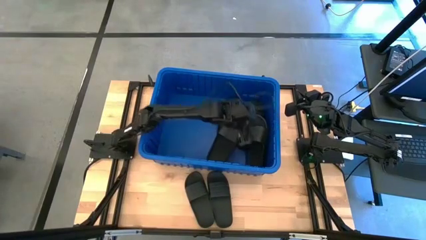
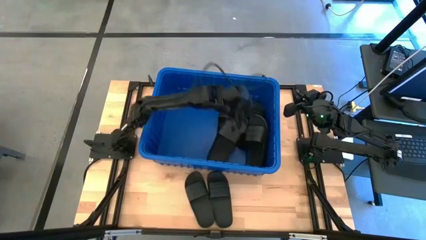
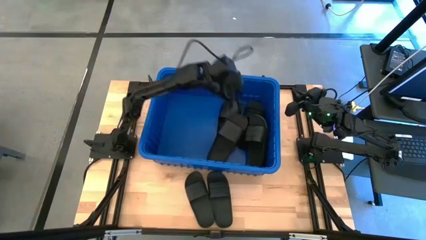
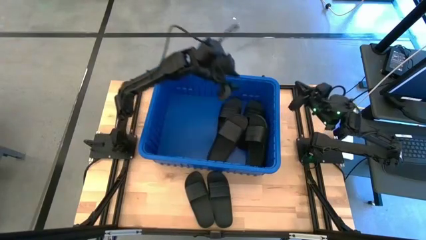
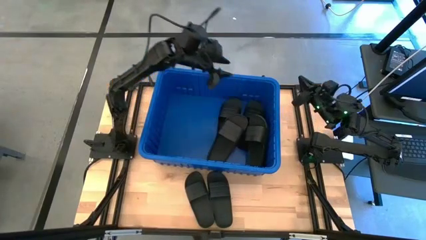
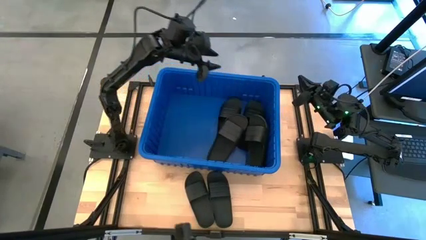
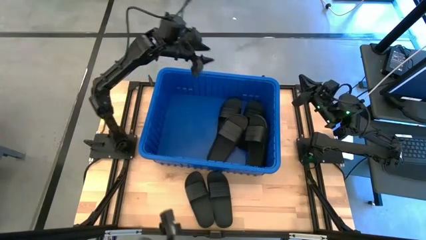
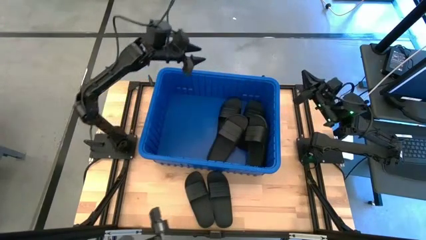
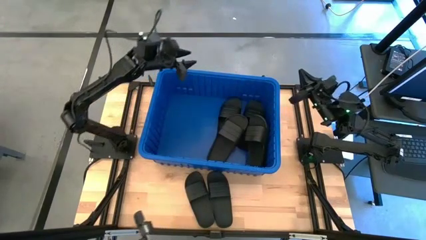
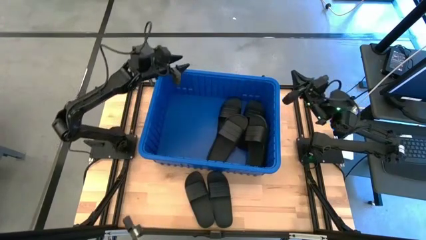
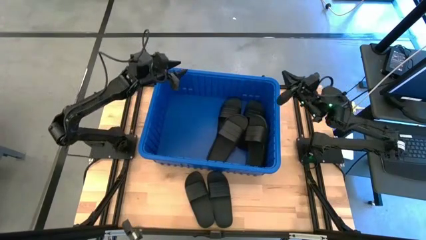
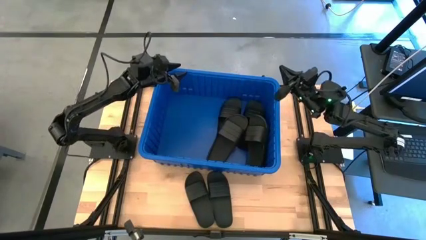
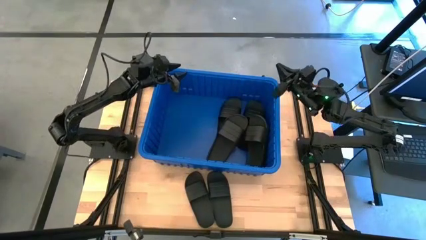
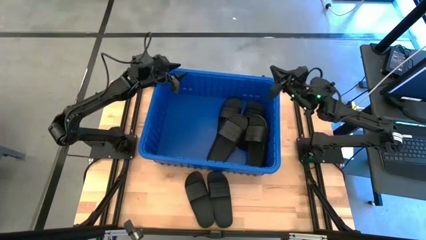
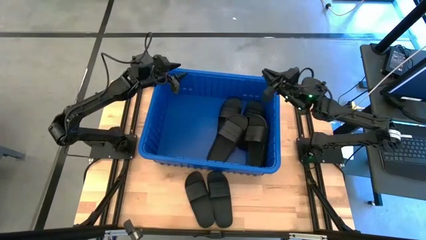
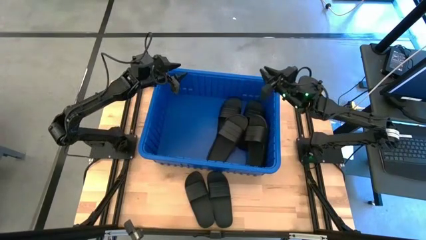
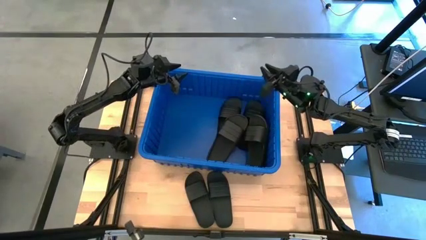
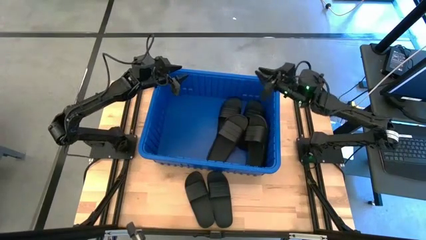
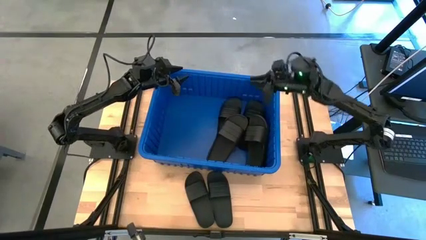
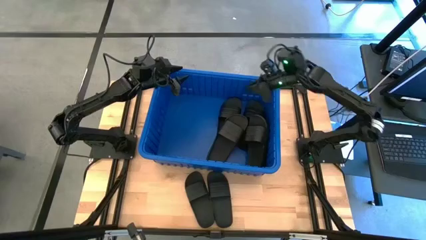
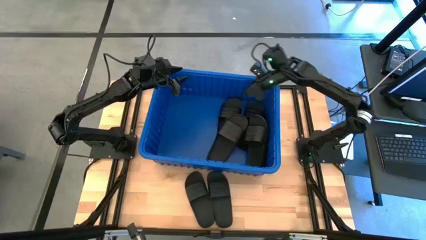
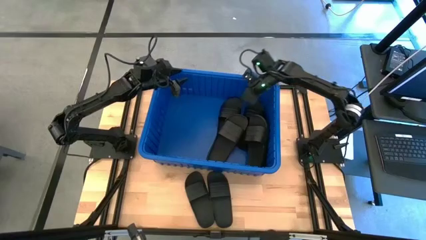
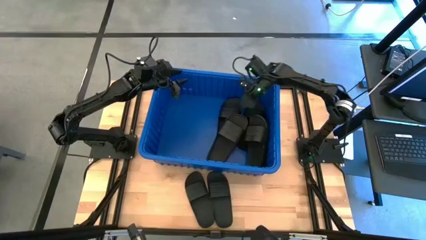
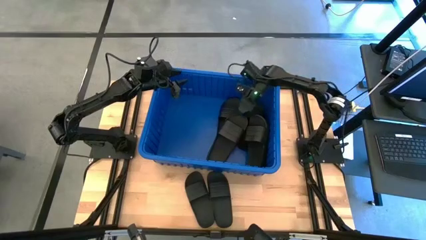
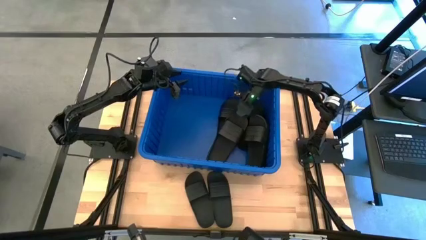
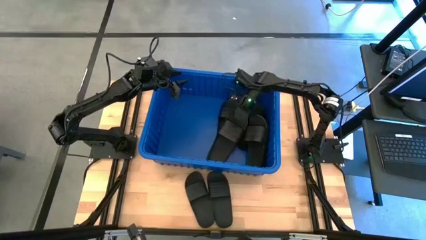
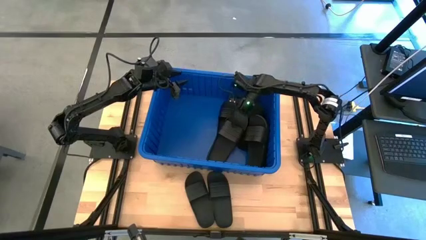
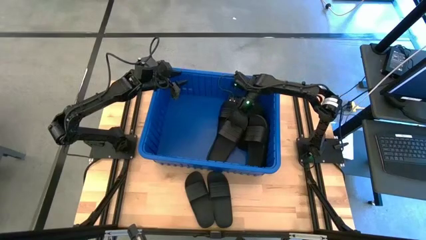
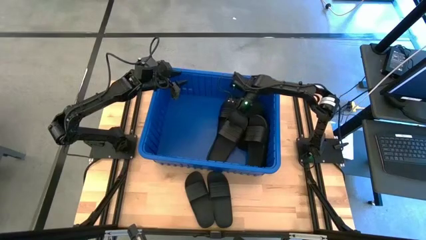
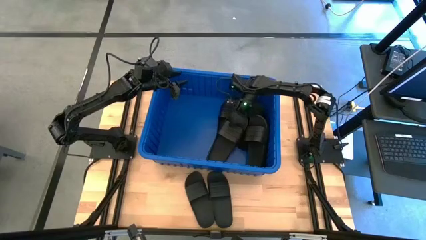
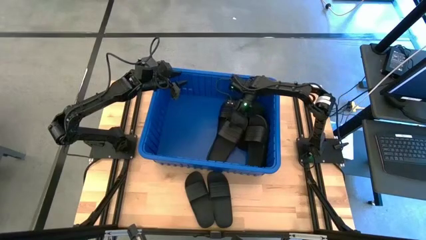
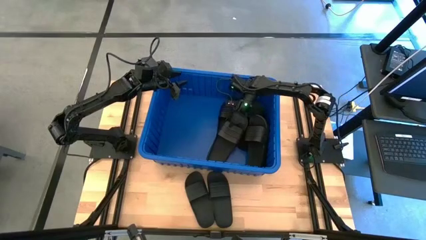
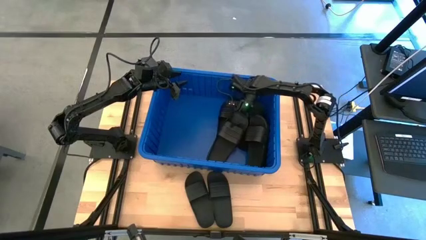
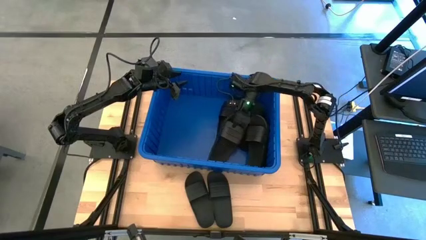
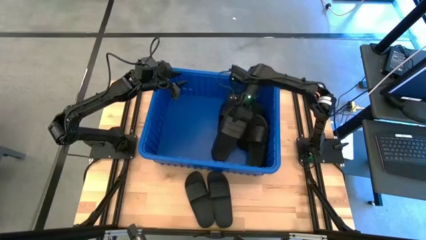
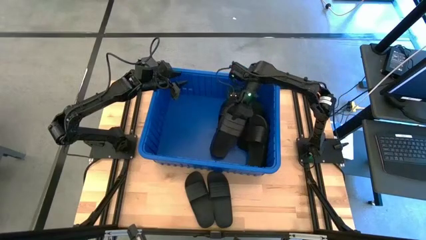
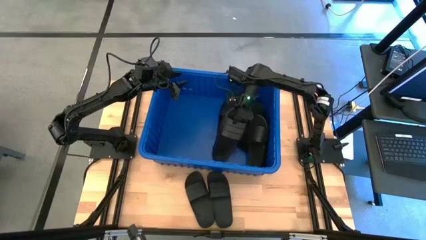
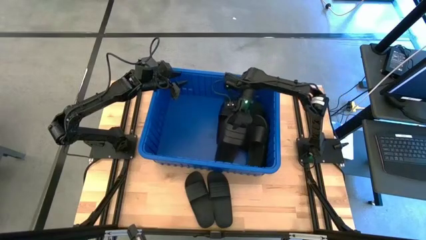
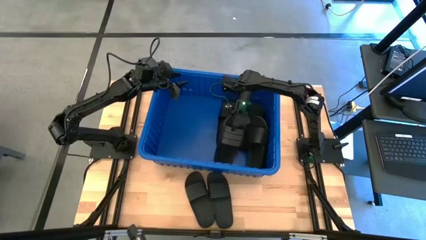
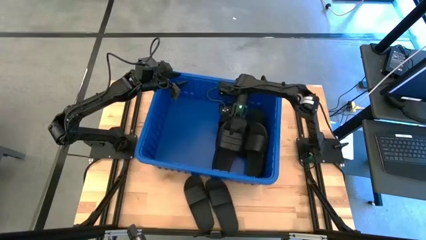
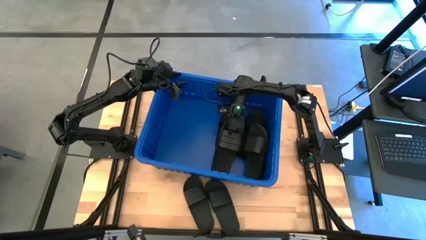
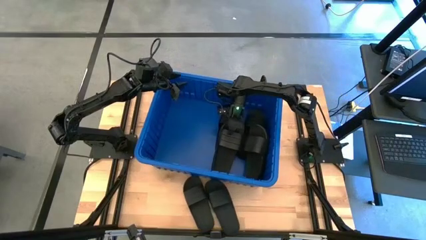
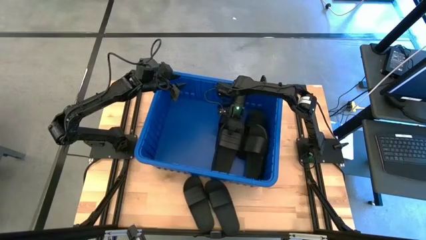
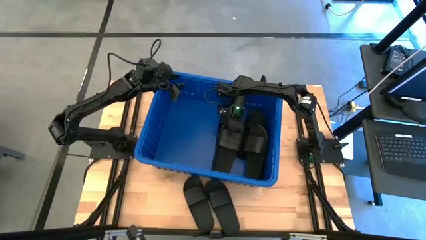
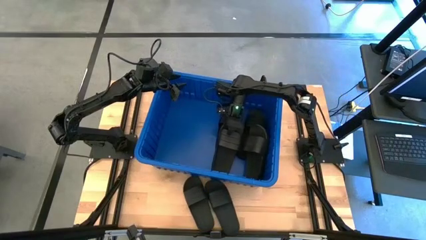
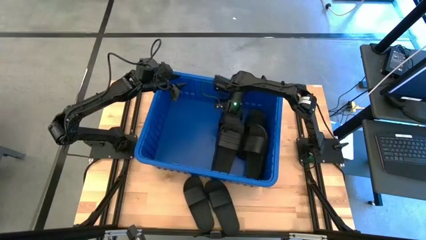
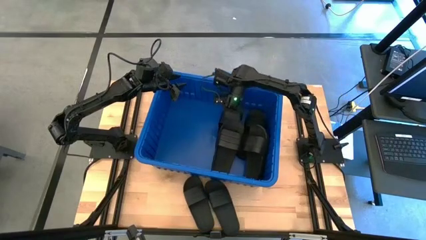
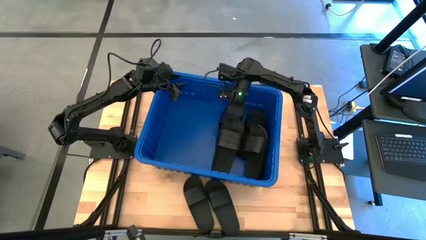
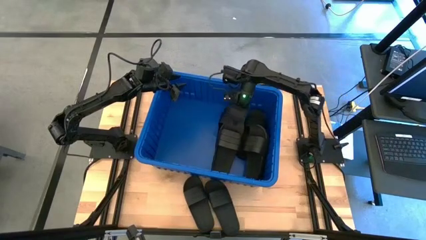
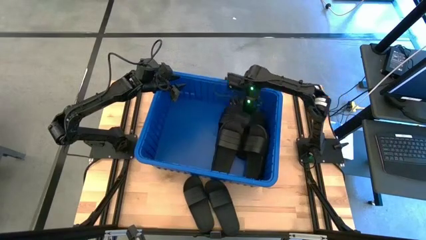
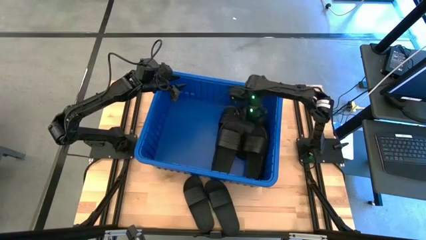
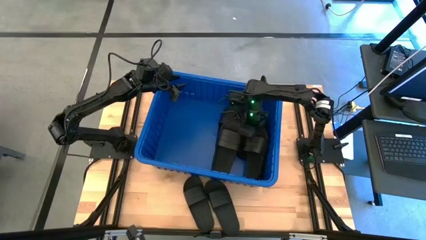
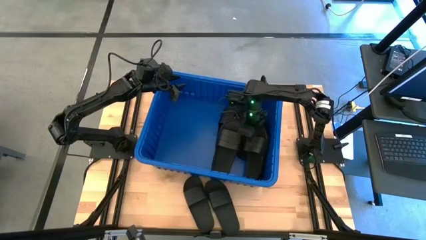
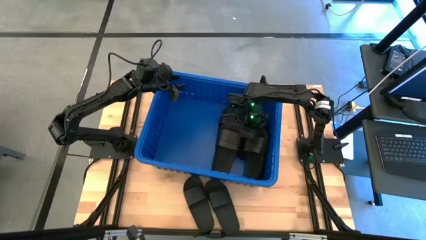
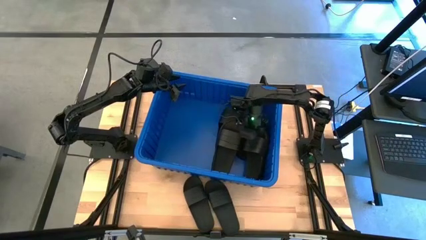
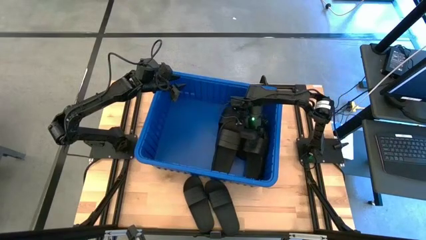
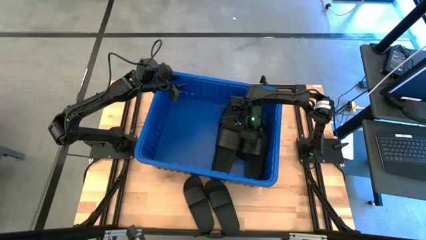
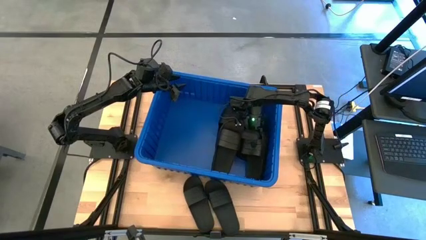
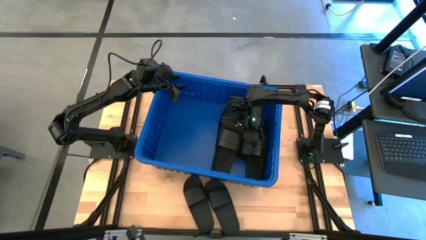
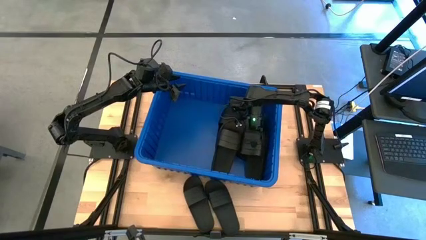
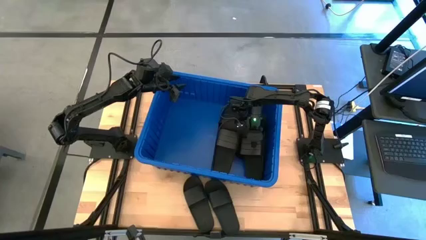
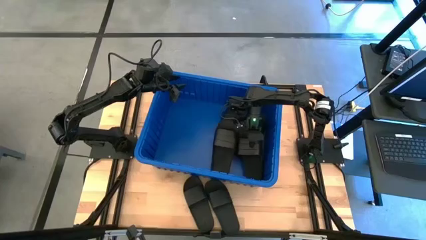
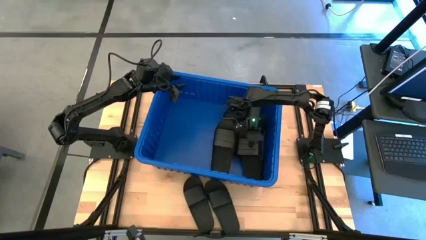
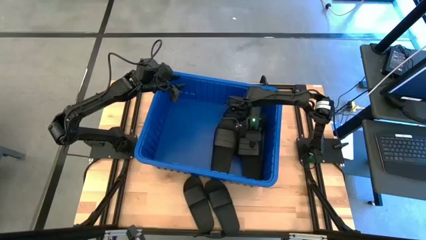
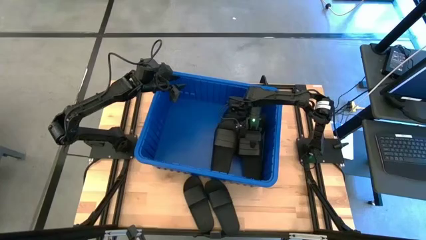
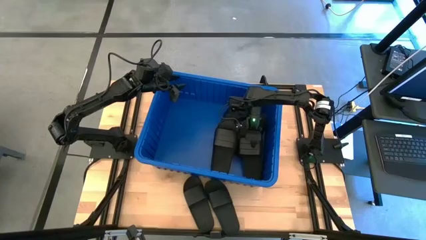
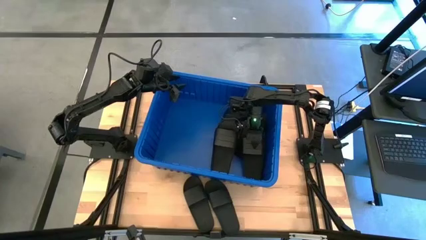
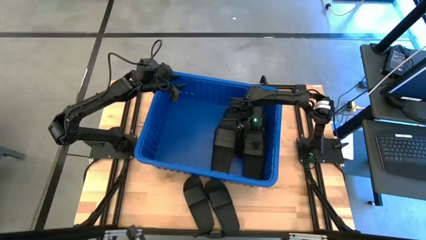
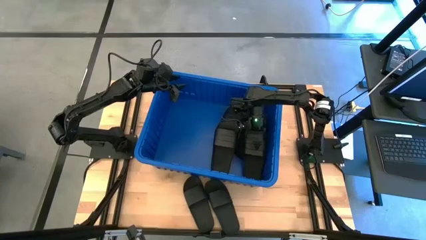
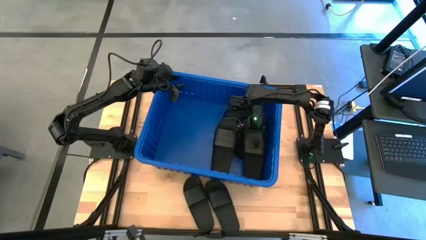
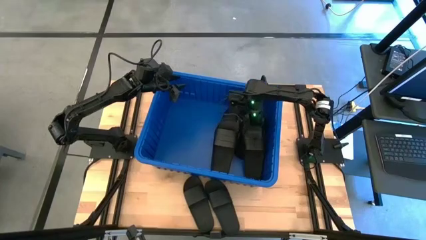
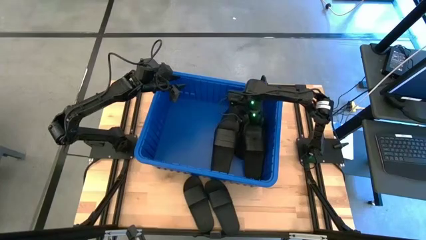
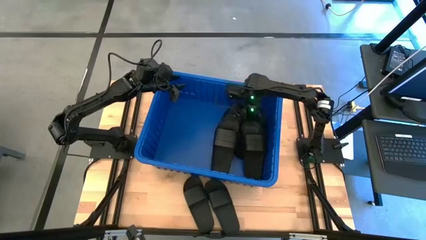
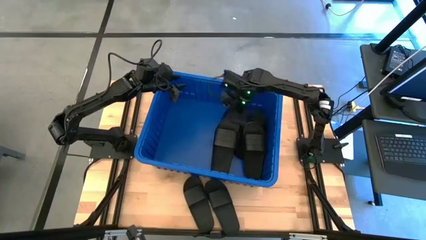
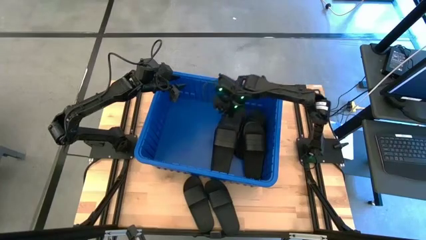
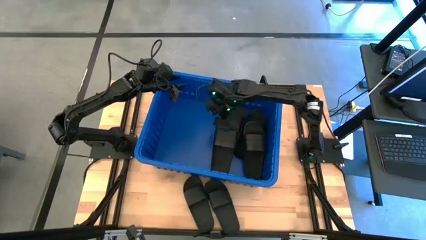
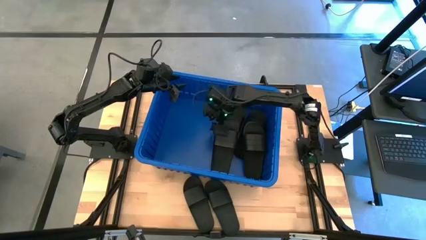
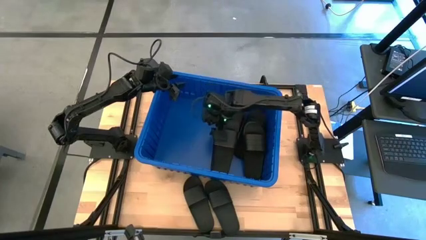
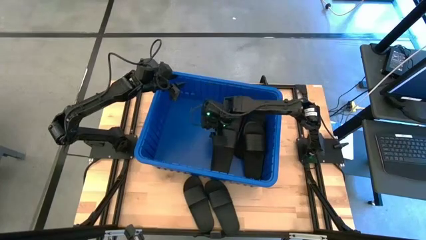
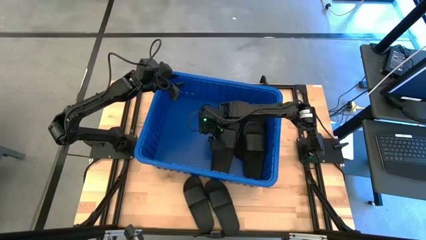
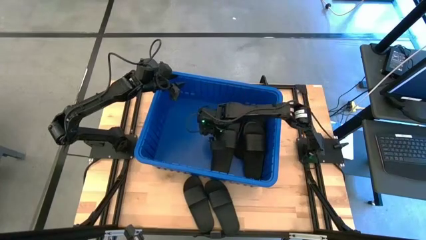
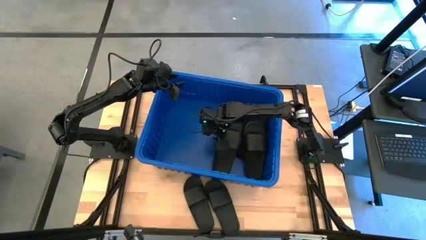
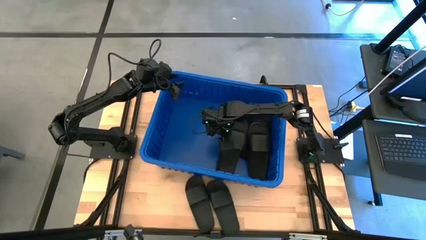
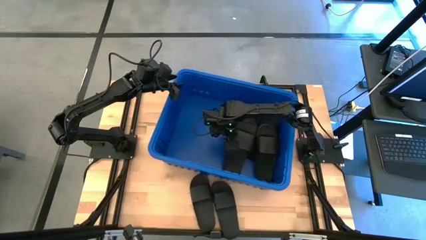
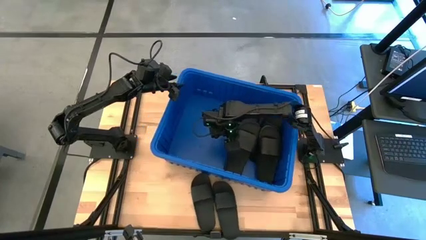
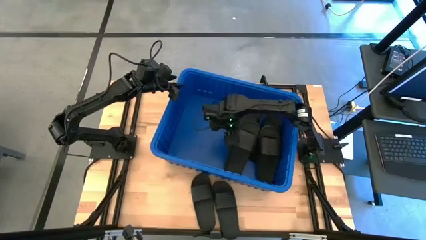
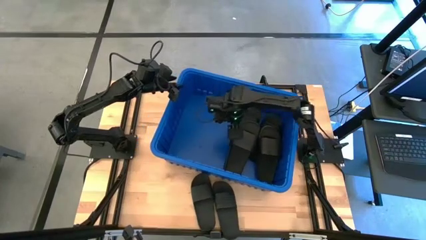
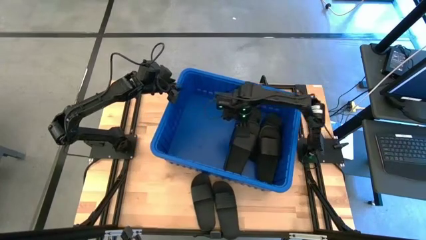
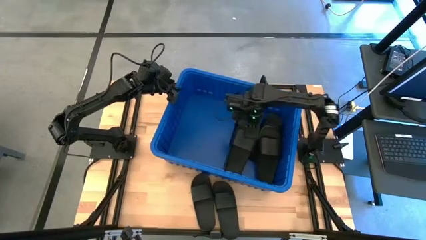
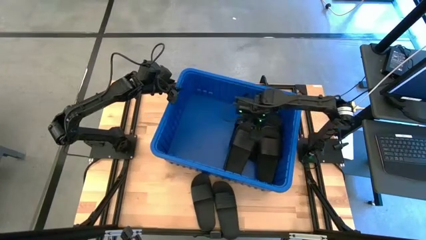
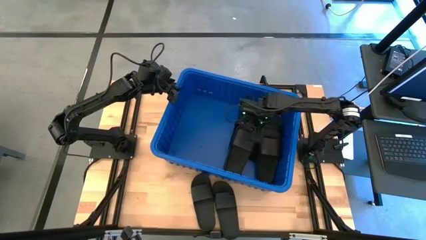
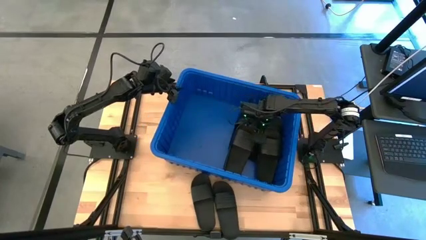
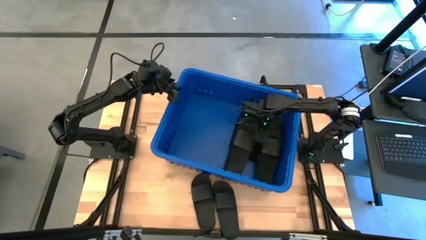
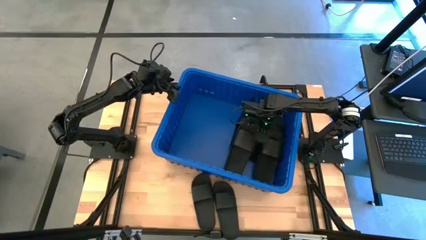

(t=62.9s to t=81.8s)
Task: Pick and place slides into bin
Adjust the black slides in the blue organizer bin
